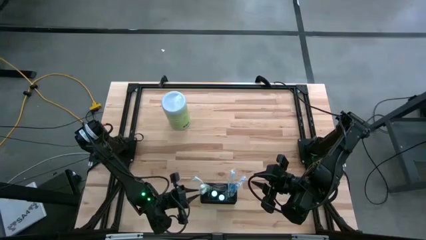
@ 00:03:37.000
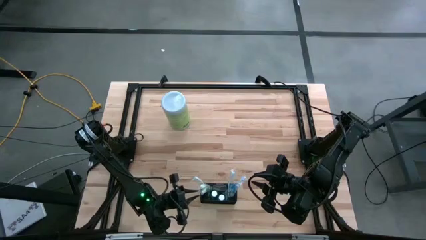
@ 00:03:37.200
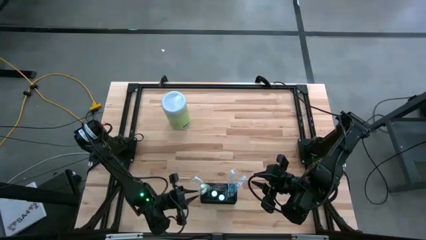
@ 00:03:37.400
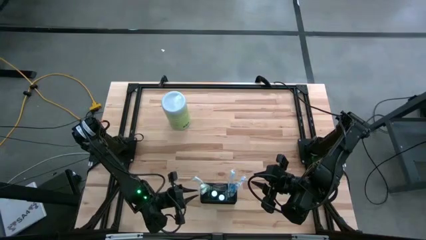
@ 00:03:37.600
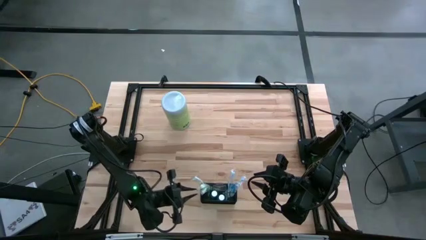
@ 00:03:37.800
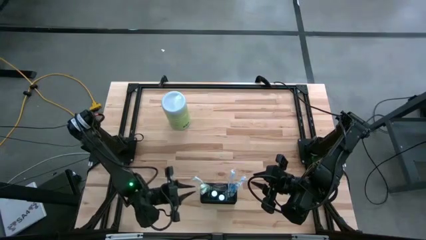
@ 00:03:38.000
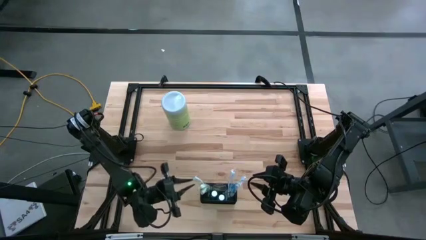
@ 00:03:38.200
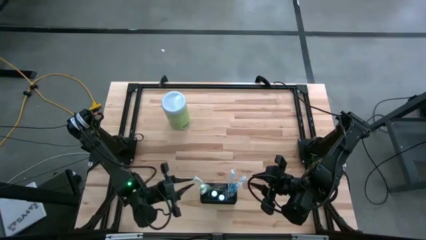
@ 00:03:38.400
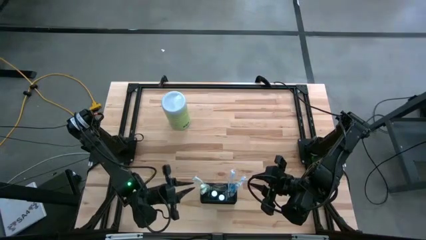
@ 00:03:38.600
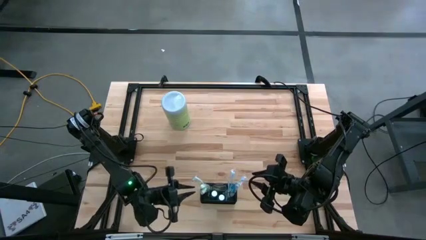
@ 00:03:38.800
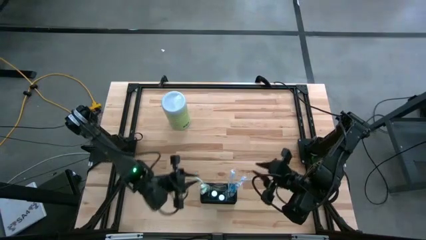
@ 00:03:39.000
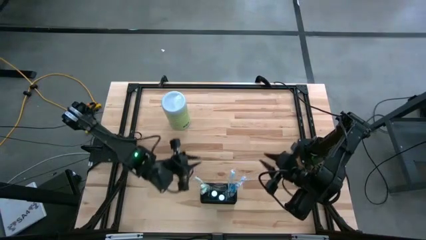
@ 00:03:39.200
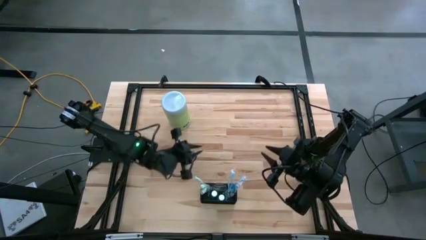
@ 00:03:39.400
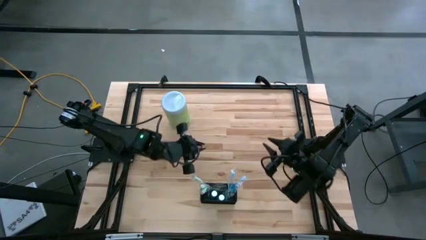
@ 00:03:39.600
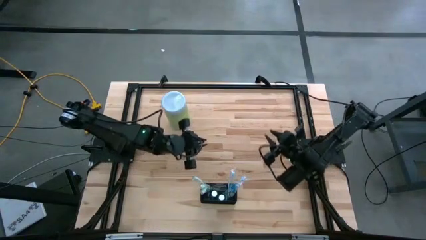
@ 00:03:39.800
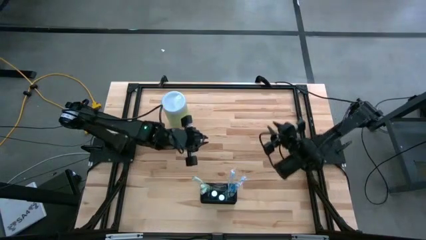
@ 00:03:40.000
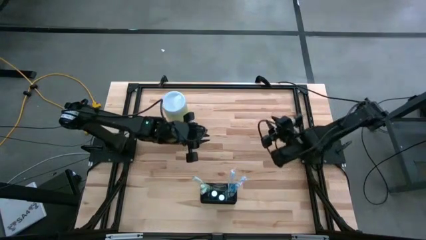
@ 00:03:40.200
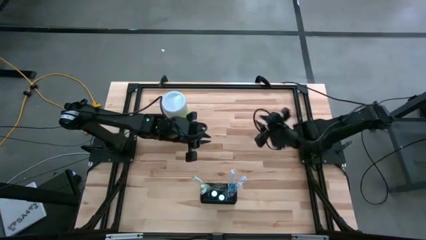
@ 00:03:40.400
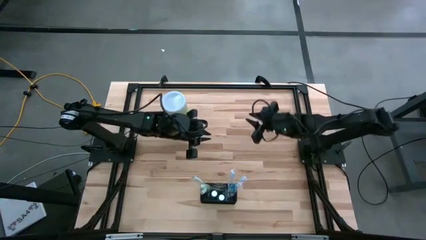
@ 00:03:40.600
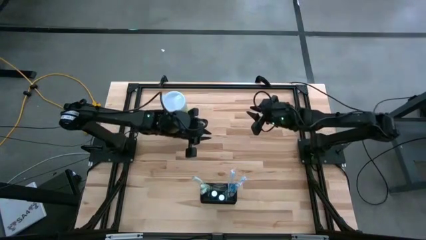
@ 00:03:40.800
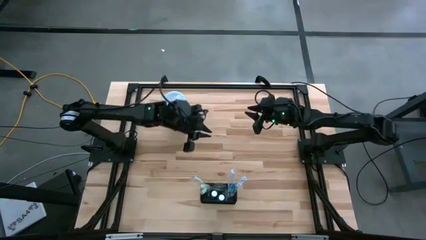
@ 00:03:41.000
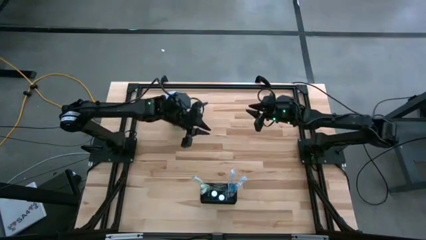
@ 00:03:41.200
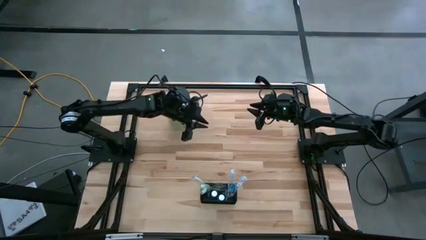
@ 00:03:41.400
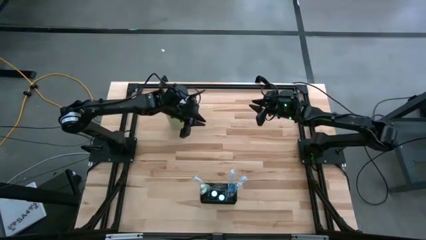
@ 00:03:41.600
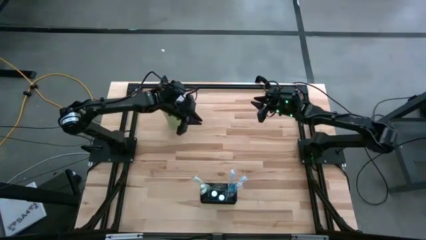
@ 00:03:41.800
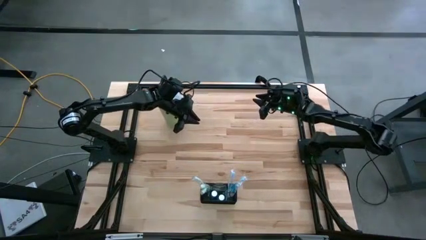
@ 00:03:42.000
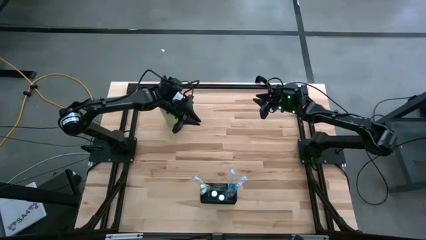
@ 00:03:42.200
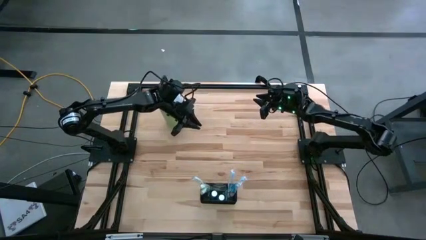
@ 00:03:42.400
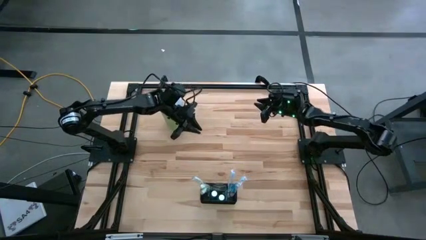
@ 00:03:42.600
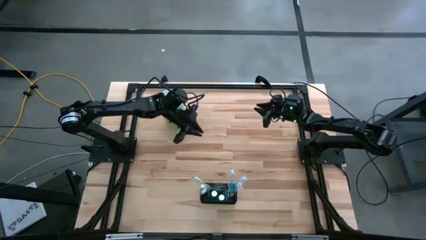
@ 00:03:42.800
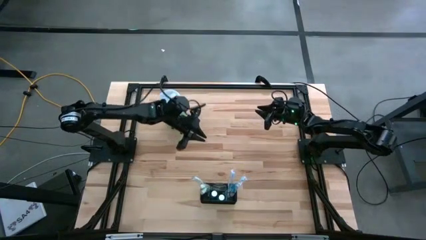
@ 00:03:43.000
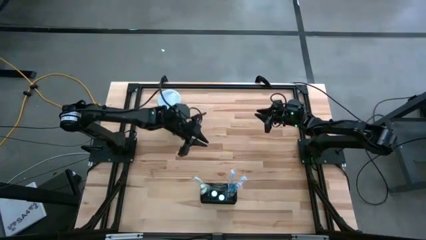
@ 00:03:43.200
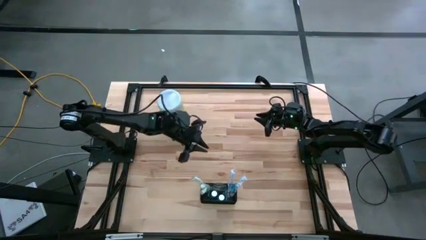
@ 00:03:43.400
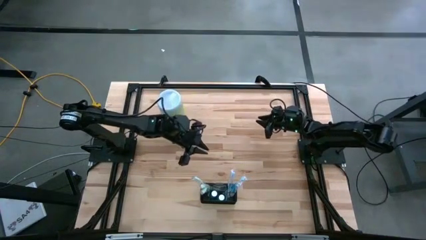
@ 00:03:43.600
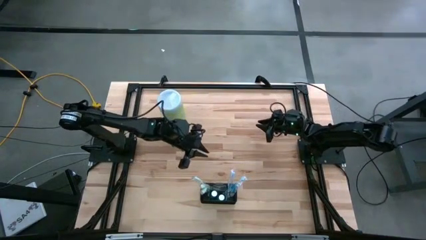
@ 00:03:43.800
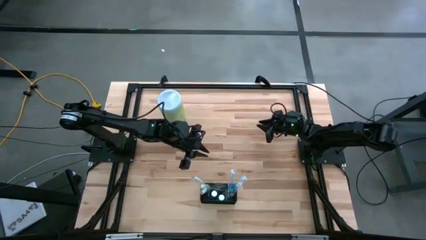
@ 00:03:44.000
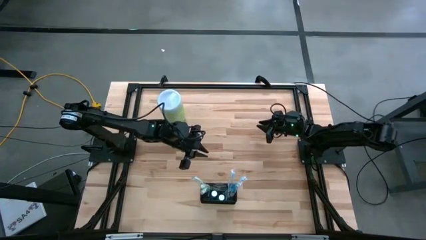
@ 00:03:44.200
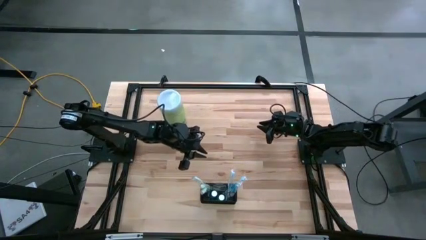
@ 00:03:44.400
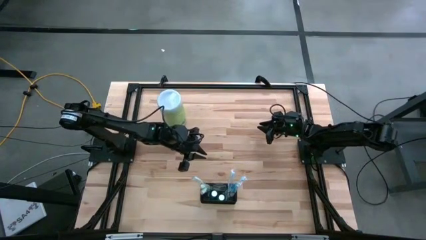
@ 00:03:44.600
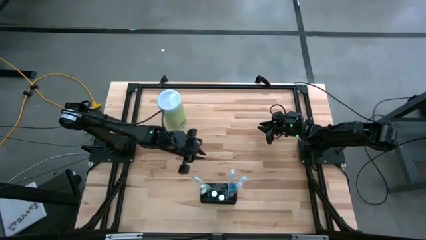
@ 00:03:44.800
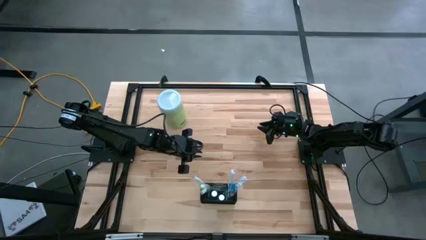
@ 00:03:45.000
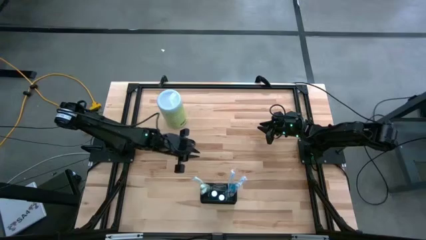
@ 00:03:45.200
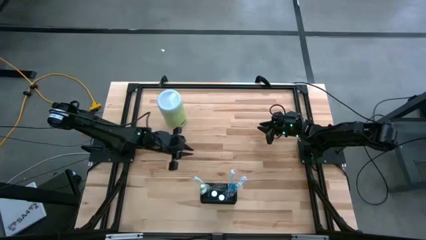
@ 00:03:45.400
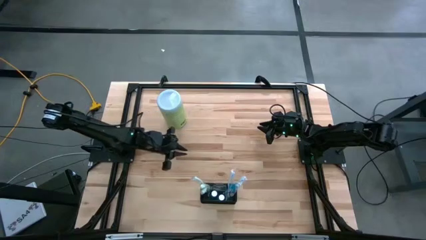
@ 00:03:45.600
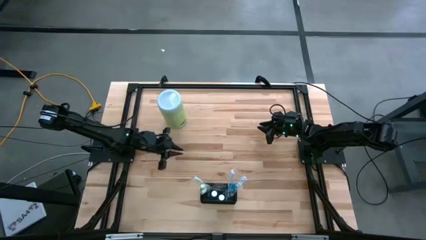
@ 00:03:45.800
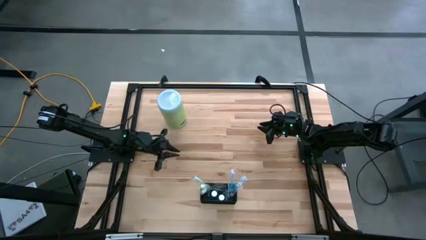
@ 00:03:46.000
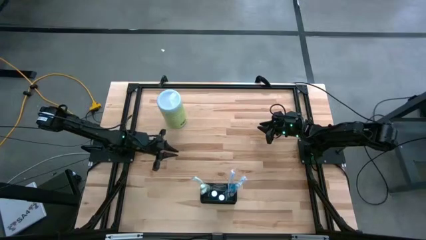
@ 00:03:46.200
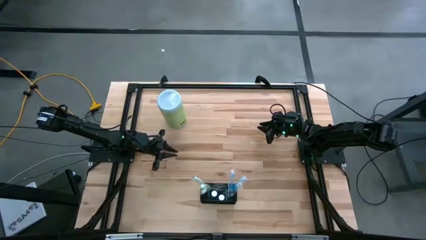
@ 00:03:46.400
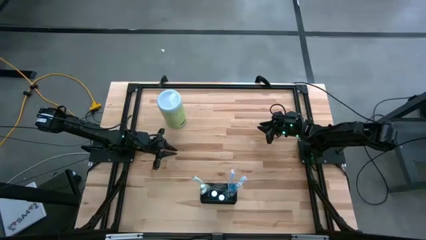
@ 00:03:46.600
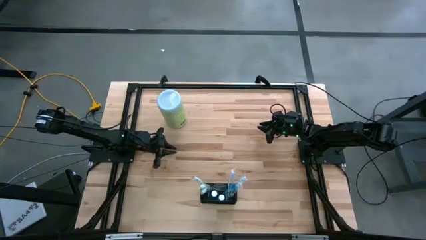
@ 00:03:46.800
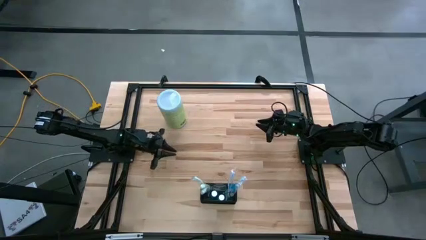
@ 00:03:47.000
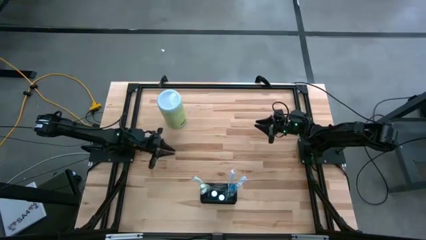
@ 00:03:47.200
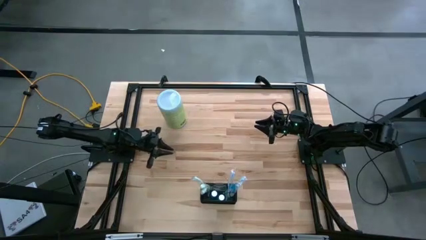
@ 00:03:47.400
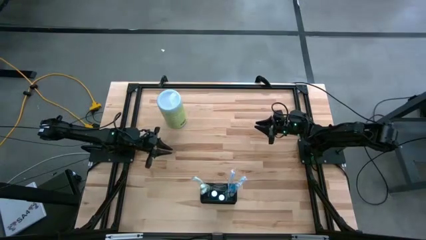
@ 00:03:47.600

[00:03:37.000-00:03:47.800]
Task: Pick & Place toothbrushing station
Return to Home Position
